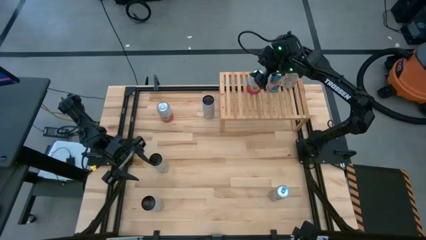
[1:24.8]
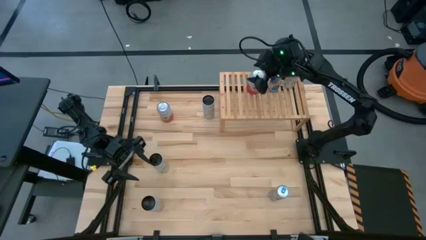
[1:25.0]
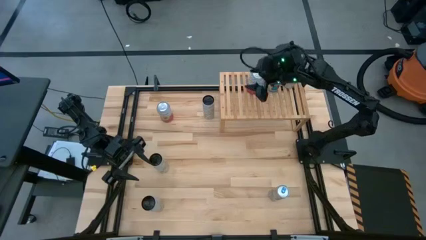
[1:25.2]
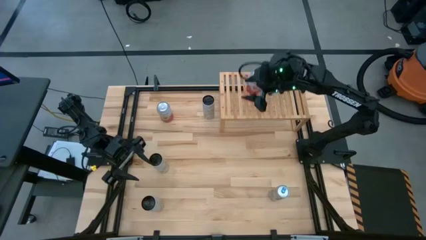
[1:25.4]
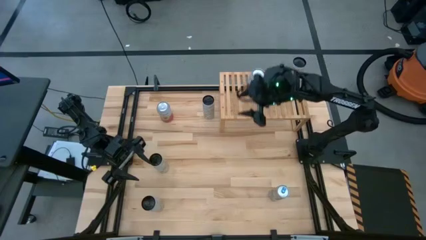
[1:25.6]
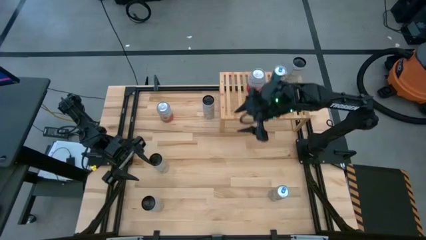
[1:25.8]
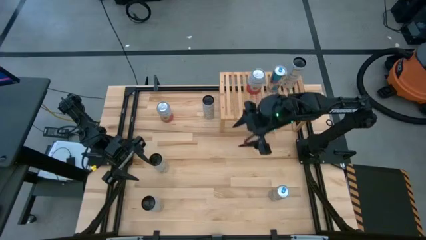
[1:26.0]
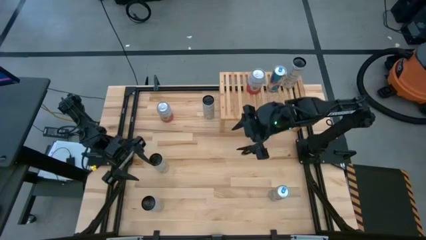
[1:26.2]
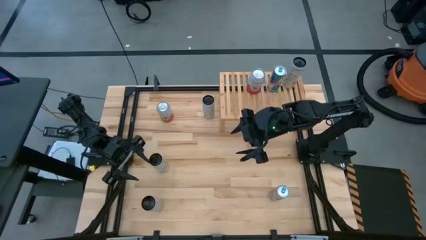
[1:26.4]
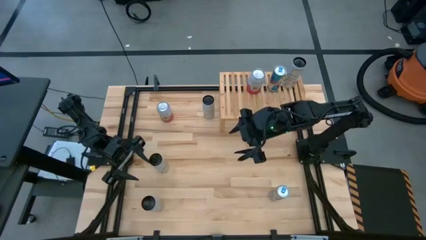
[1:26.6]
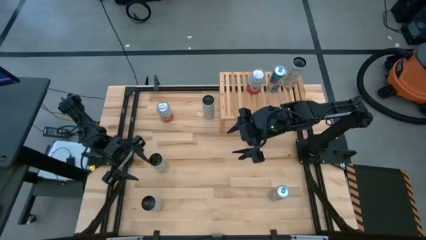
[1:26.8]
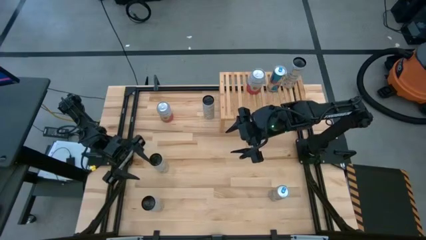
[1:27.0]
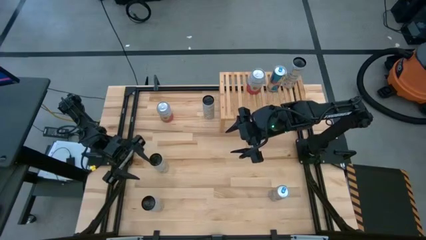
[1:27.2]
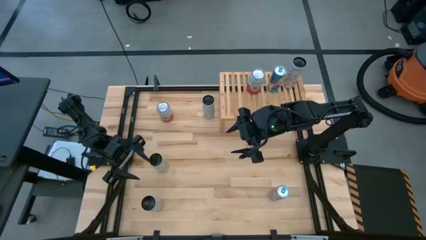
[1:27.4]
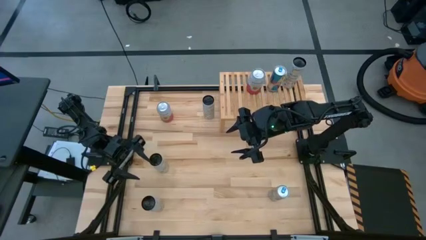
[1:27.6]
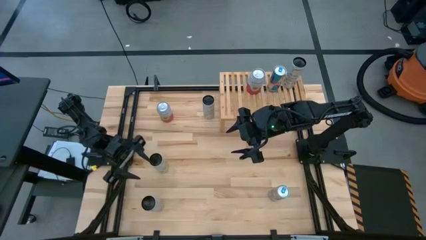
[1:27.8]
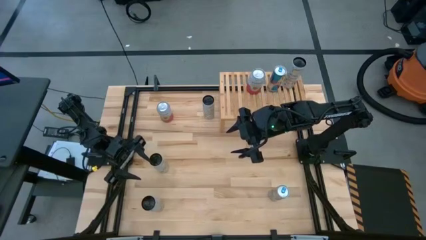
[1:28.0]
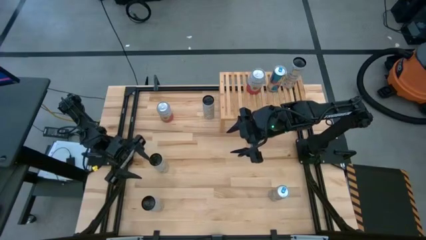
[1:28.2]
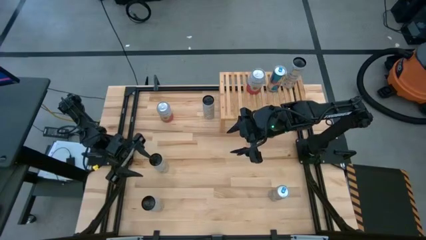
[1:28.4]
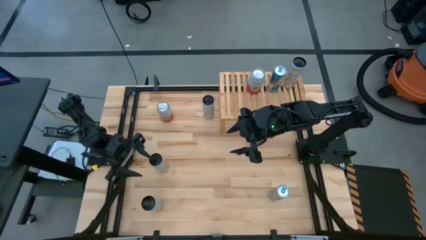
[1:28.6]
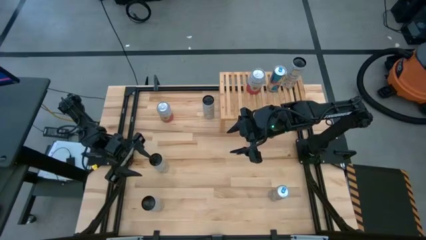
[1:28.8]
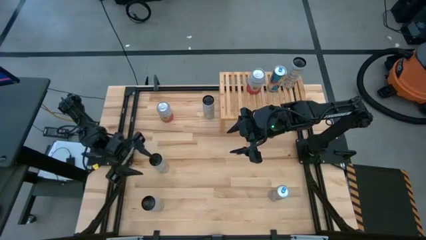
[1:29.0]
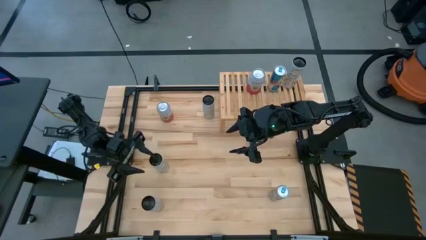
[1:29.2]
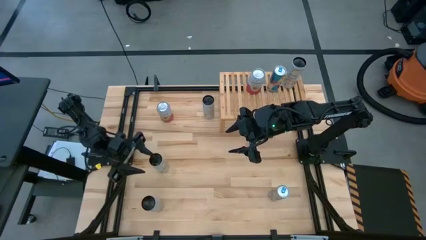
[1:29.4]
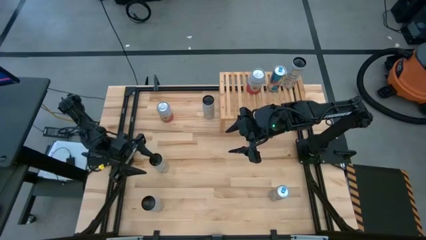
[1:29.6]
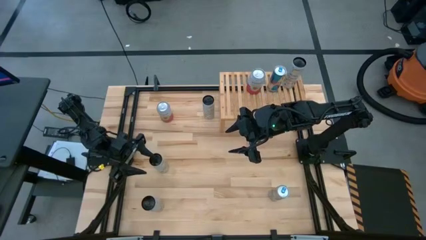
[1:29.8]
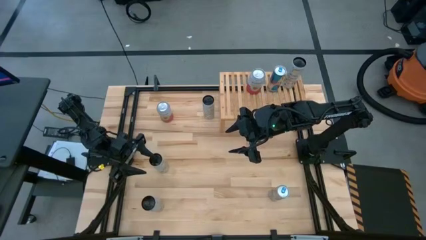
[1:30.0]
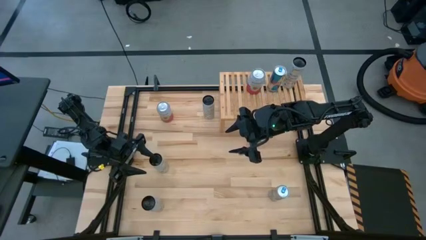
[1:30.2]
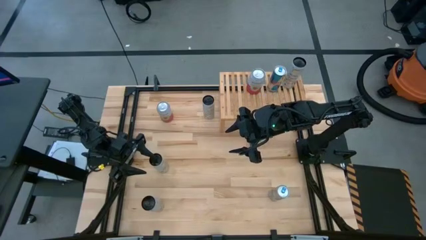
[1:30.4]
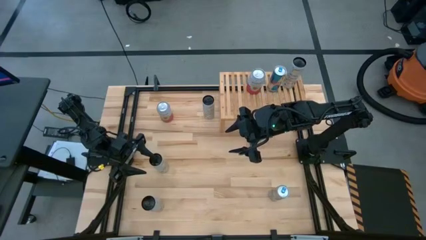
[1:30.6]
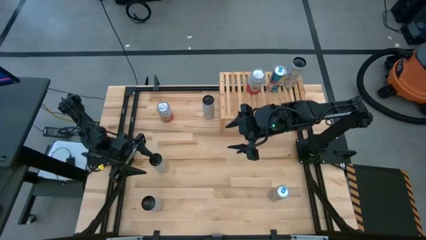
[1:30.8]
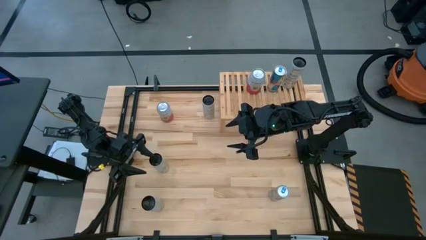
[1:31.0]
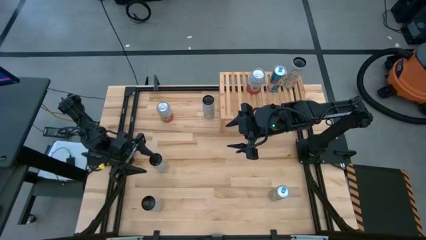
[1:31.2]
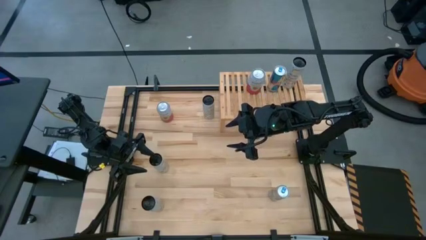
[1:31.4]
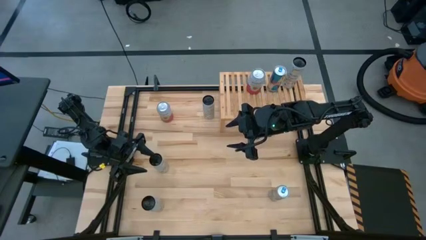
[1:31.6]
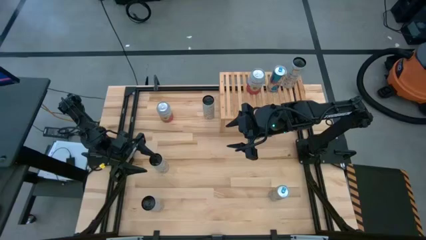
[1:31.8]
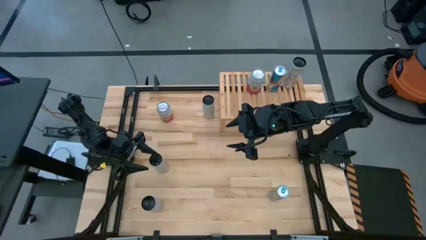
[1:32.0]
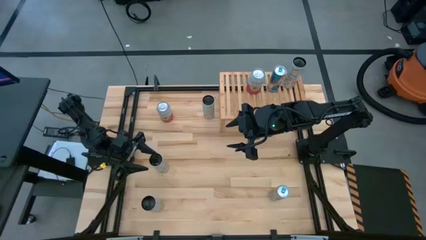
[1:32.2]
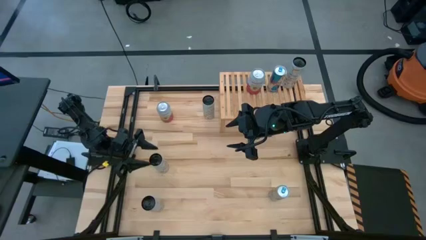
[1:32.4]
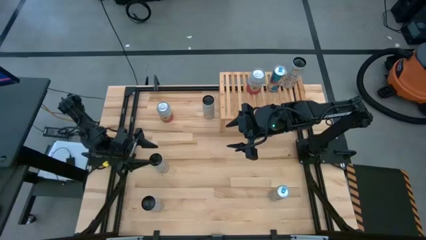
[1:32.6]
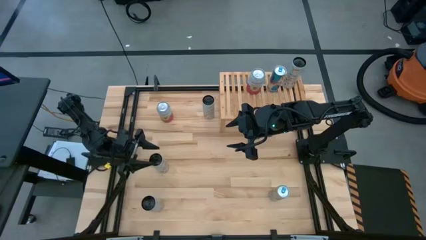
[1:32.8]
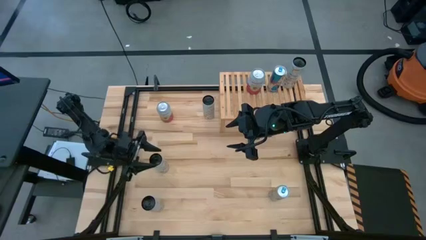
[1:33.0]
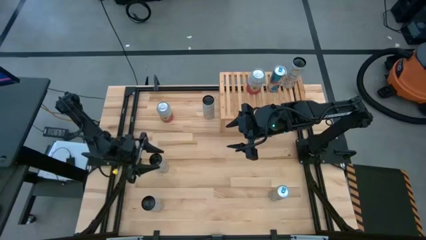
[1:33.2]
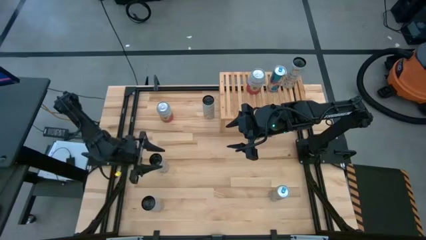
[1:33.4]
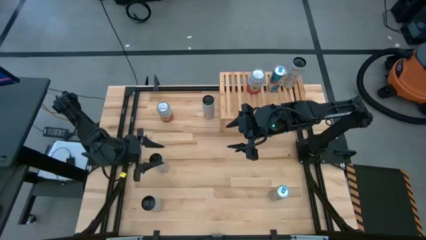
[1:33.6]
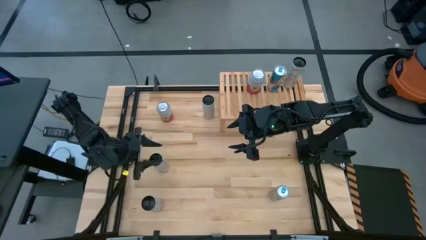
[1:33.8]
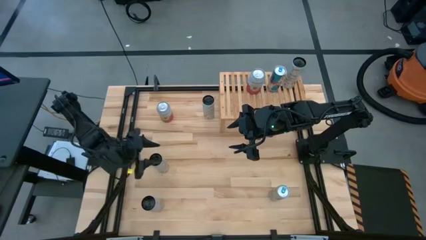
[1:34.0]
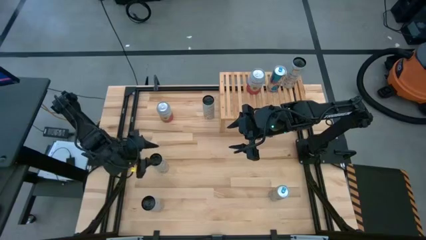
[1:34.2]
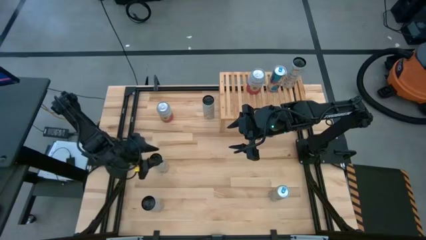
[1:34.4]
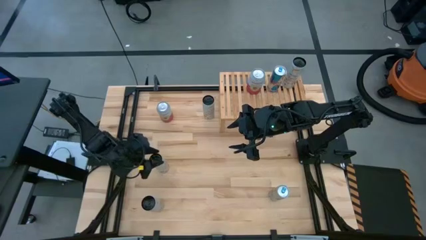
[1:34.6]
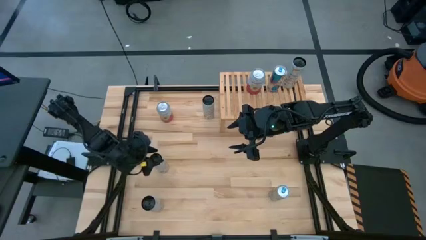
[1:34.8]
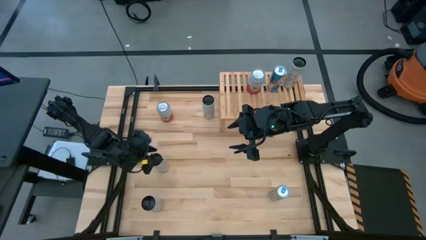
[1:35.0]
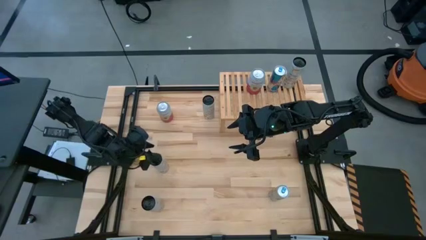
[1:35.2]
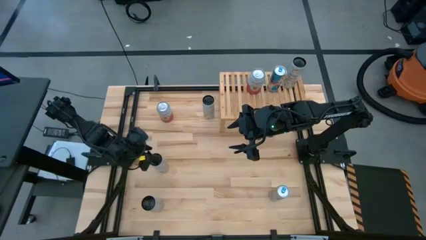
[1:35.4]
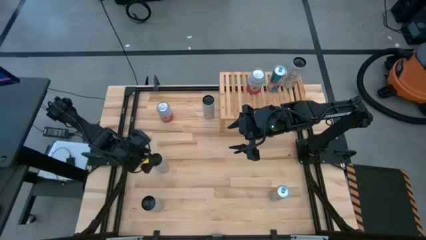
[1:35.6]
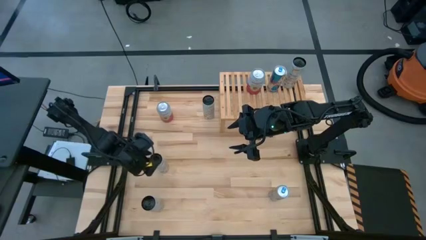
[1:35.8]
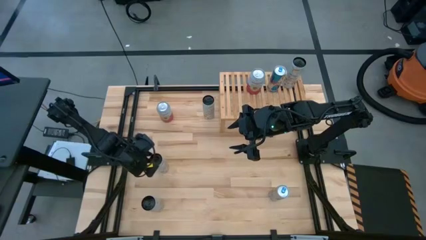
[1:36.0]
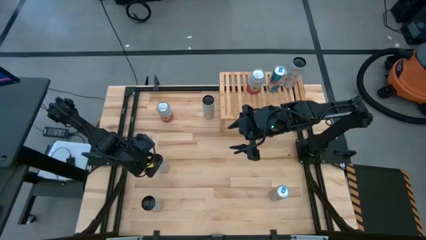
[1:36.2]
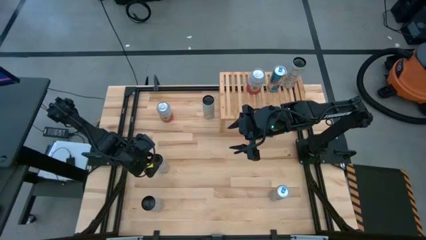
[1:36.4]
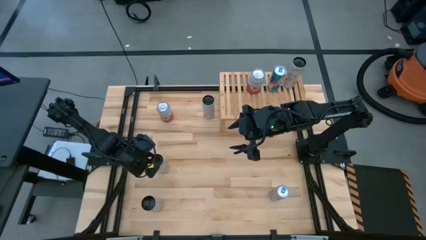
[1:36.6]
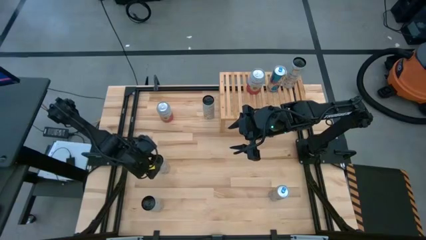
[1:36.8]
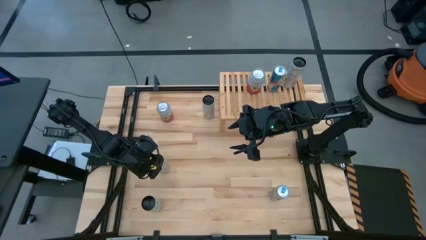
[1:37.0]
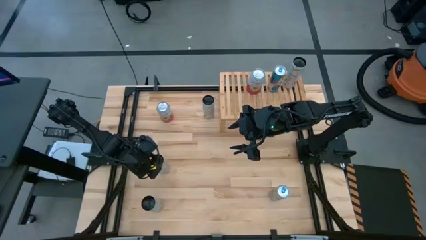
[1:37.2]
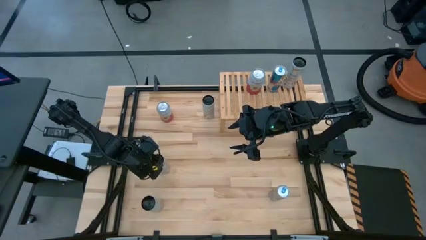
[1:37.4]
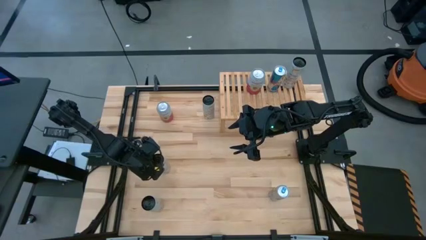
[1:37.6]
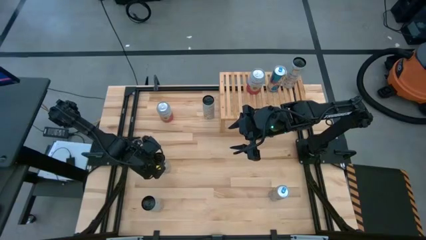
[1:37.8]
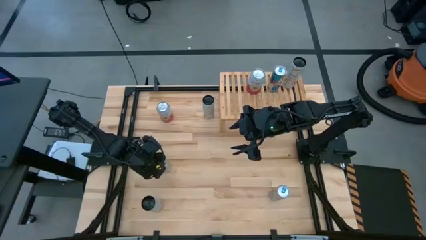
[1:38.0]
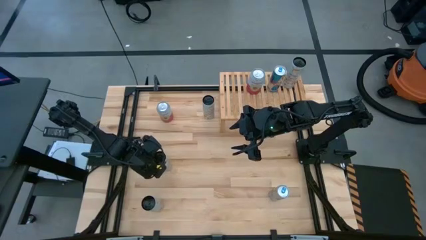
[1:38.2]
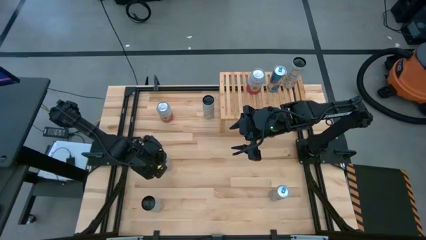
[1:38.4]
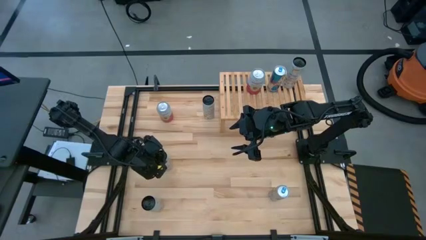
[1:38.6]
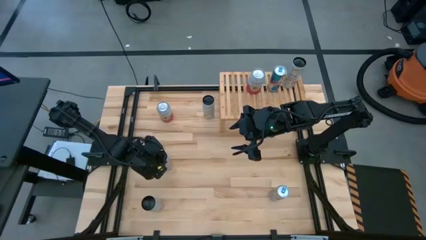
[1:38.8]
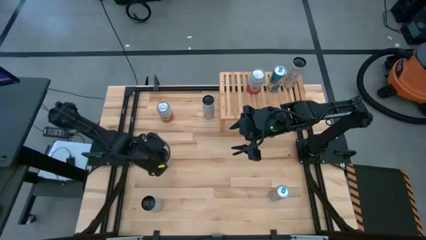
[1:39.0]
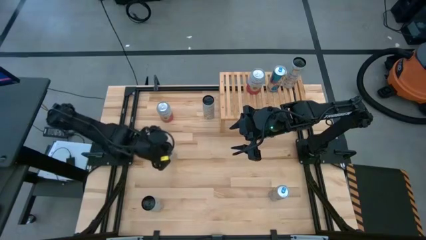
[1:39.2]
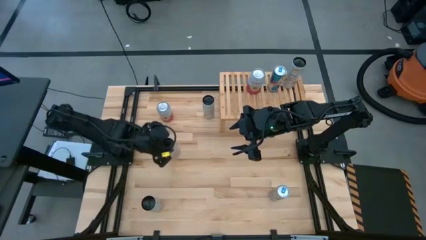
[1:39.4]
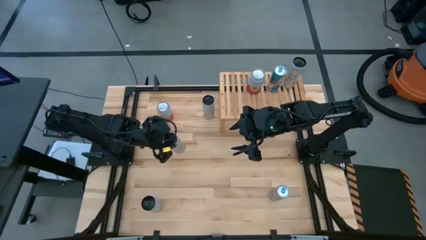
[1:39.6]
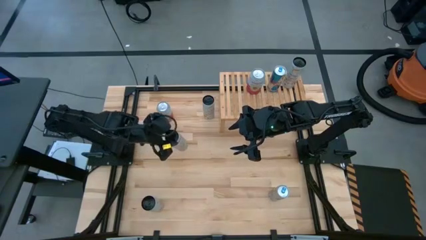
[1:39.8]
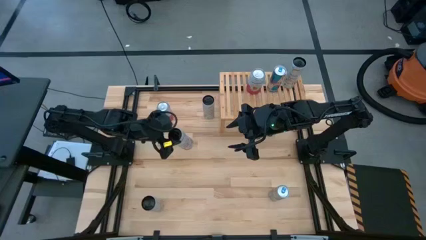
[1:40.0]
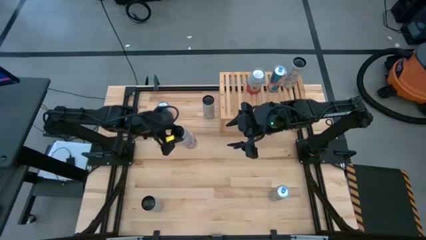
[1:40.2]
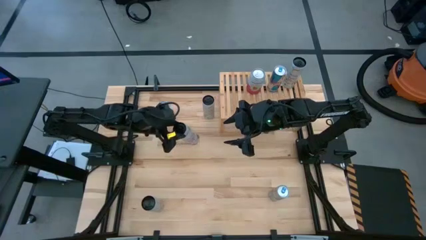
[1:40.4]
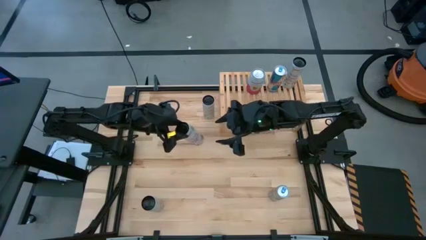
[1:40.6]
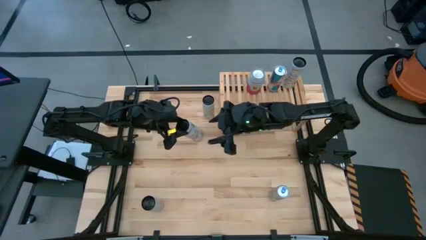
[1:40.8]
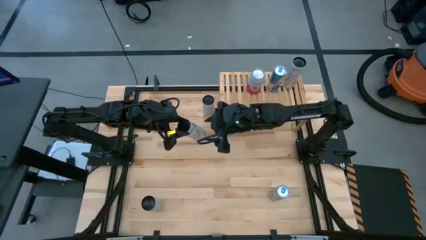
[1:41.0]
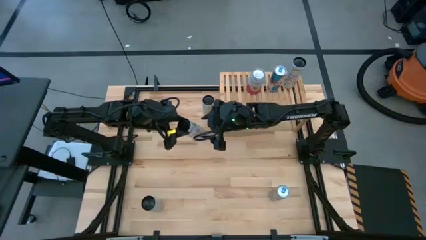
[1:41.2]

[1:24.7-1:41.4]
Task: Place canned beverage on shelf
Put the top white-pink soda can on the shelf
